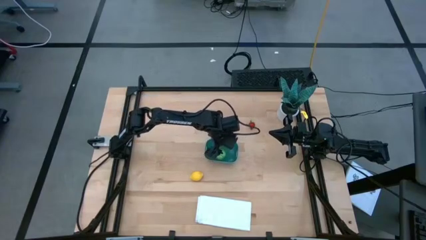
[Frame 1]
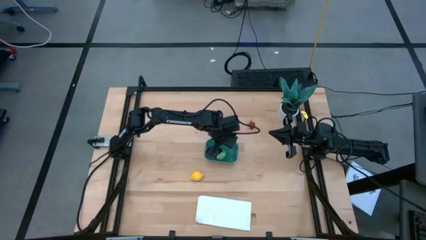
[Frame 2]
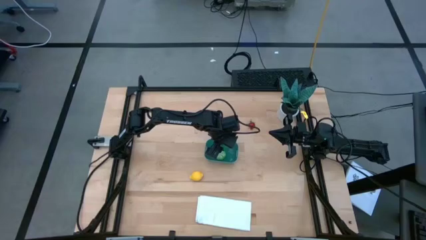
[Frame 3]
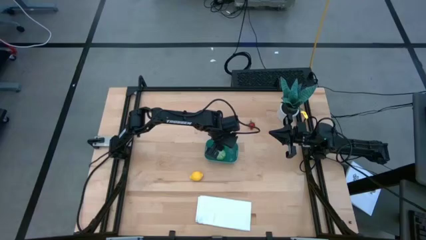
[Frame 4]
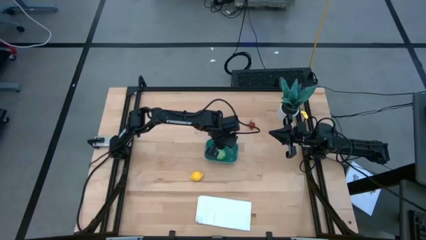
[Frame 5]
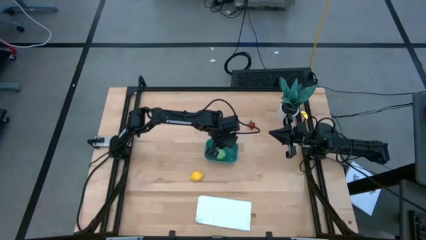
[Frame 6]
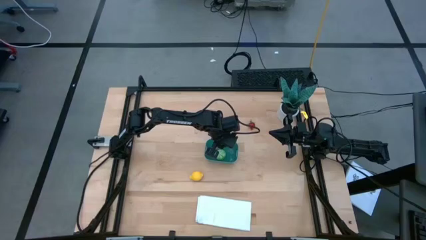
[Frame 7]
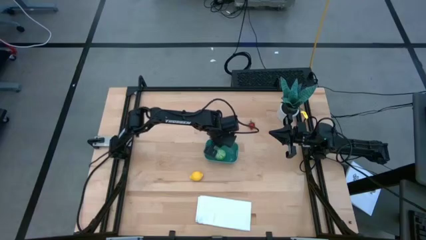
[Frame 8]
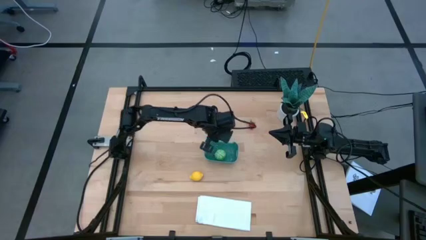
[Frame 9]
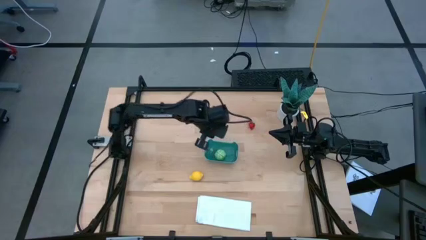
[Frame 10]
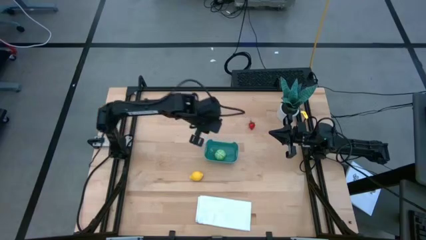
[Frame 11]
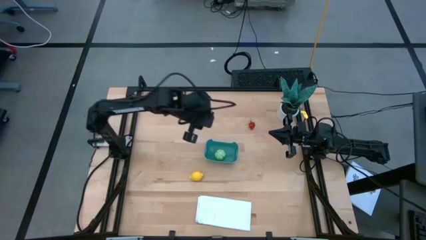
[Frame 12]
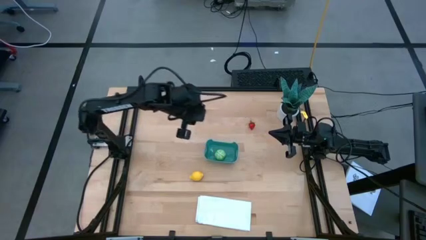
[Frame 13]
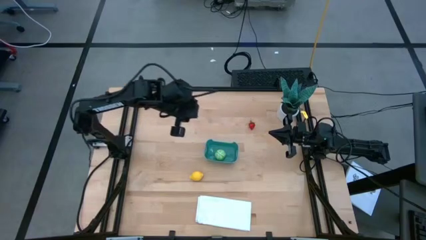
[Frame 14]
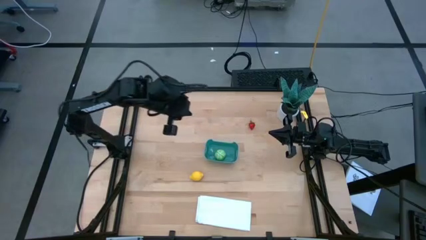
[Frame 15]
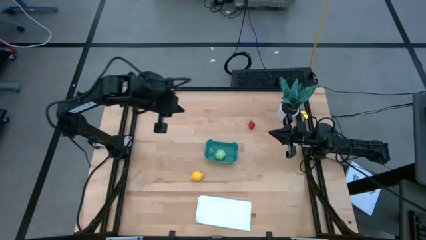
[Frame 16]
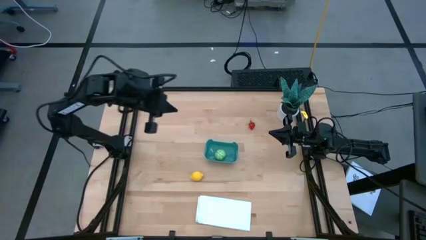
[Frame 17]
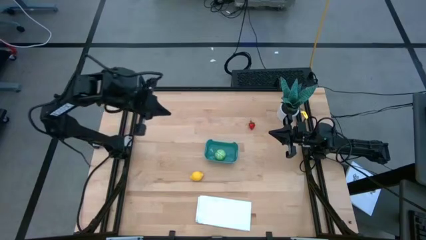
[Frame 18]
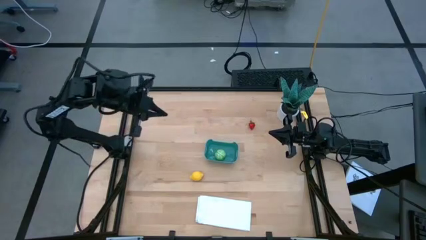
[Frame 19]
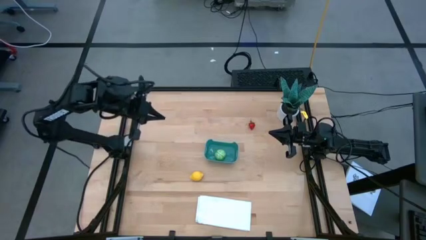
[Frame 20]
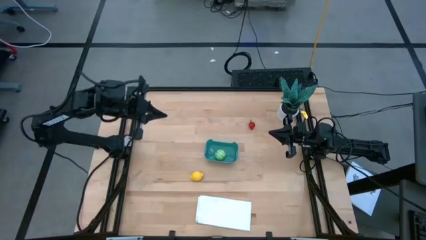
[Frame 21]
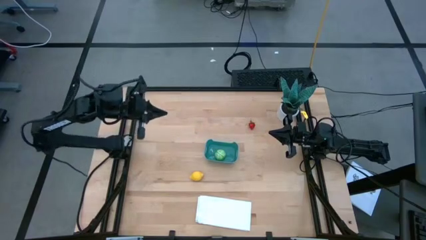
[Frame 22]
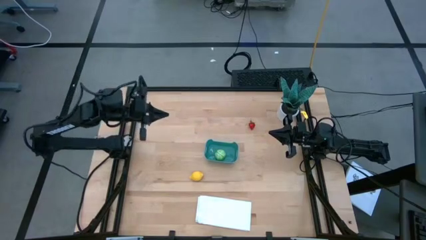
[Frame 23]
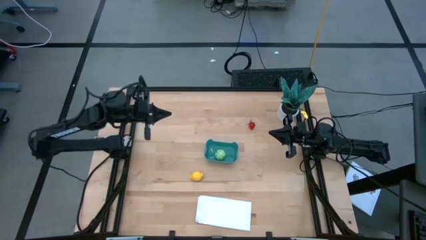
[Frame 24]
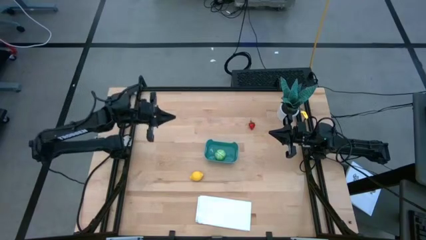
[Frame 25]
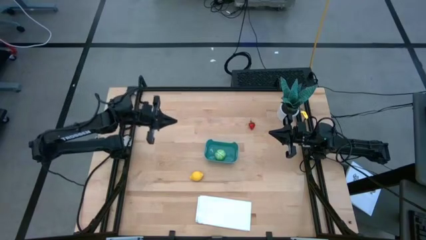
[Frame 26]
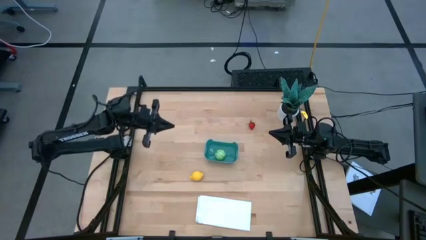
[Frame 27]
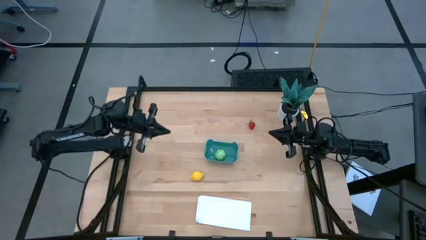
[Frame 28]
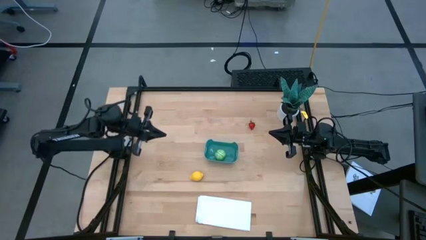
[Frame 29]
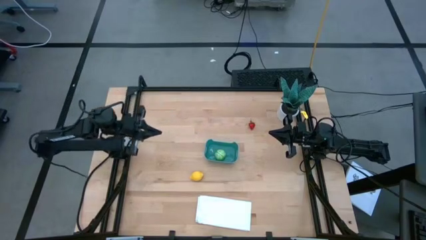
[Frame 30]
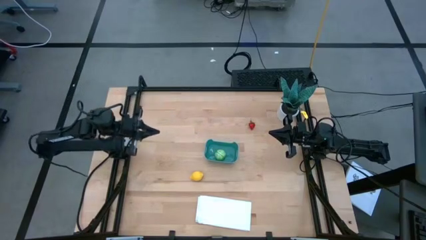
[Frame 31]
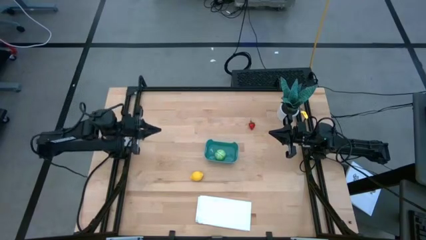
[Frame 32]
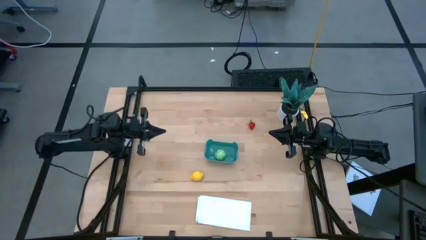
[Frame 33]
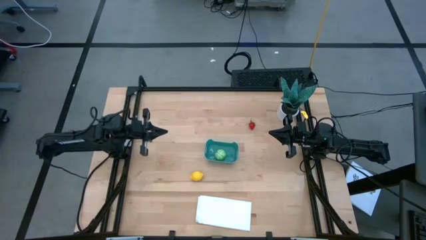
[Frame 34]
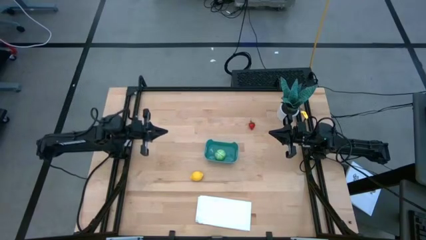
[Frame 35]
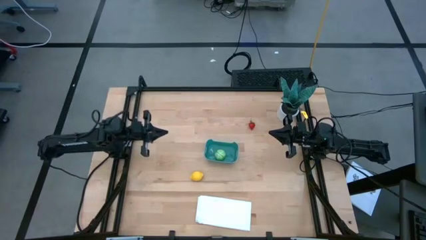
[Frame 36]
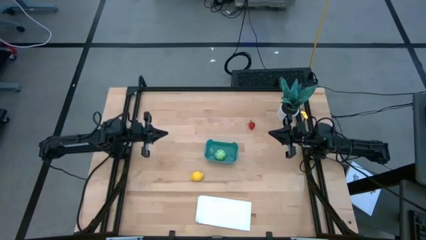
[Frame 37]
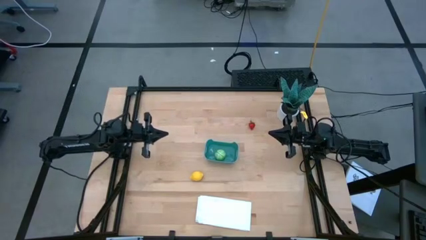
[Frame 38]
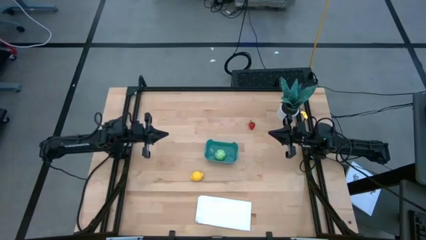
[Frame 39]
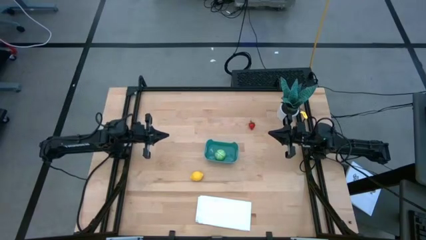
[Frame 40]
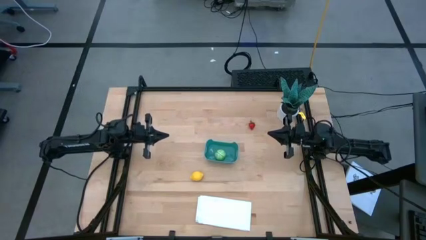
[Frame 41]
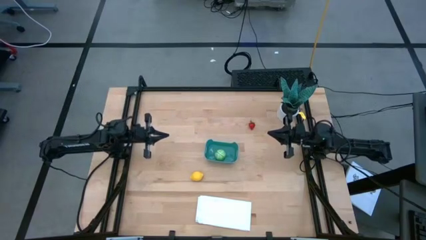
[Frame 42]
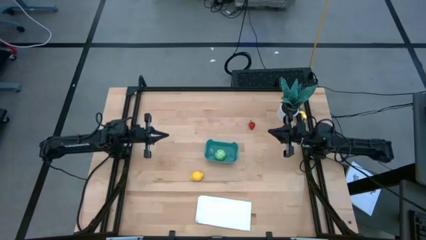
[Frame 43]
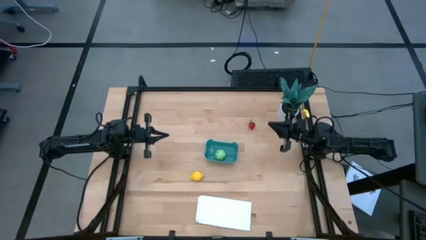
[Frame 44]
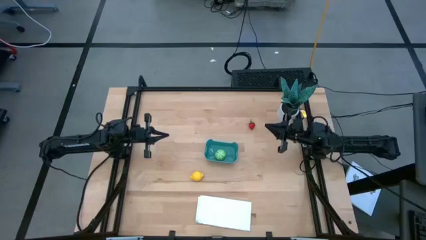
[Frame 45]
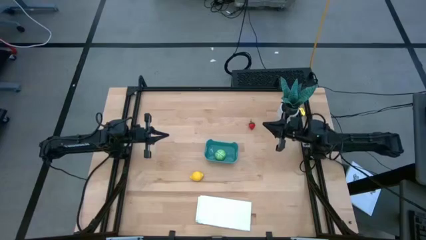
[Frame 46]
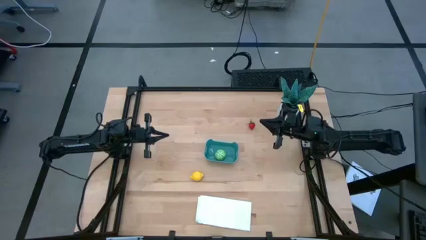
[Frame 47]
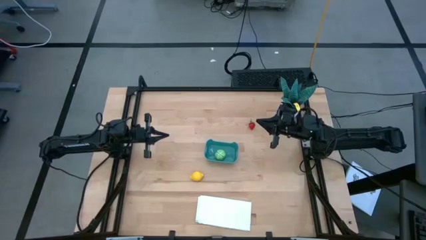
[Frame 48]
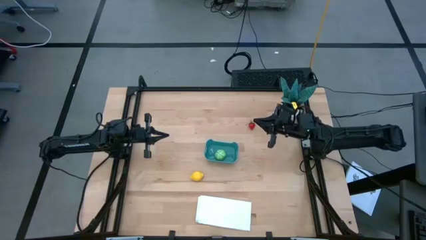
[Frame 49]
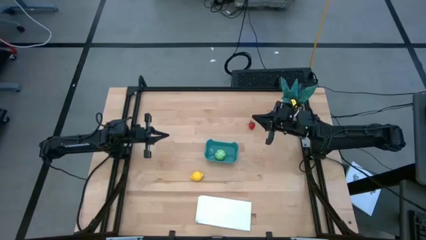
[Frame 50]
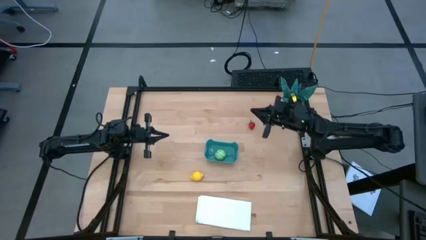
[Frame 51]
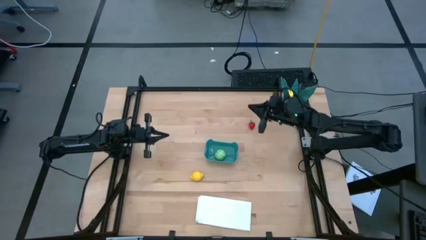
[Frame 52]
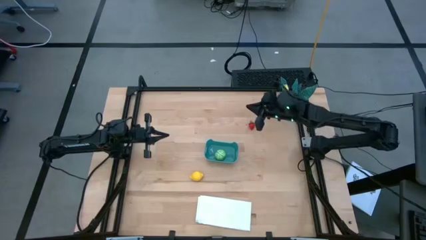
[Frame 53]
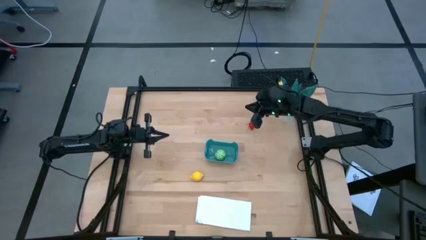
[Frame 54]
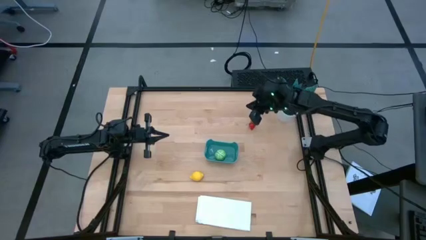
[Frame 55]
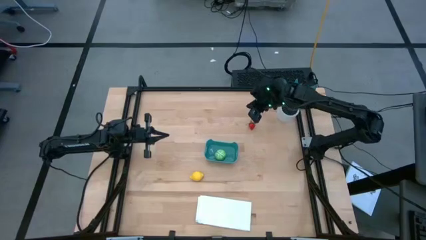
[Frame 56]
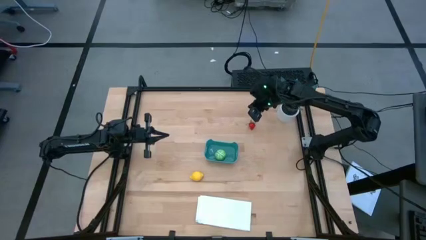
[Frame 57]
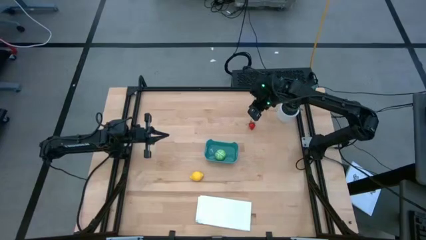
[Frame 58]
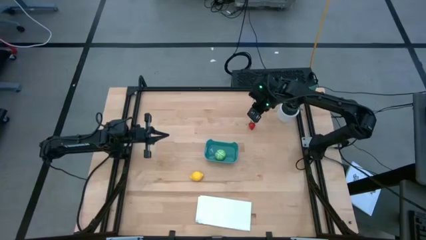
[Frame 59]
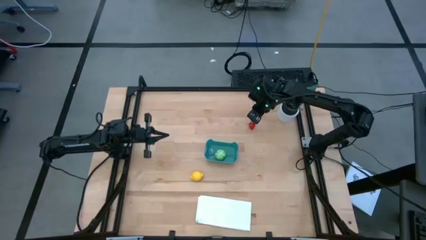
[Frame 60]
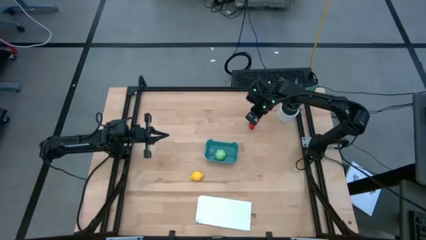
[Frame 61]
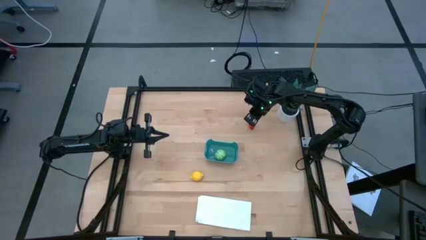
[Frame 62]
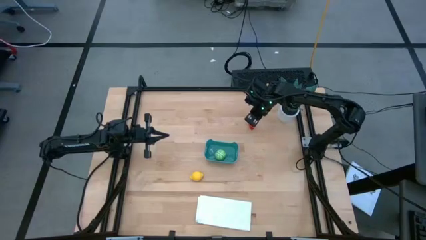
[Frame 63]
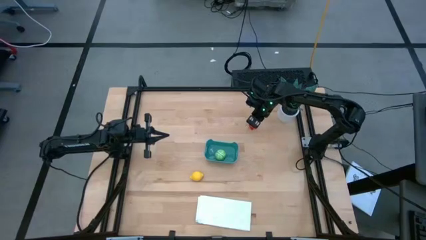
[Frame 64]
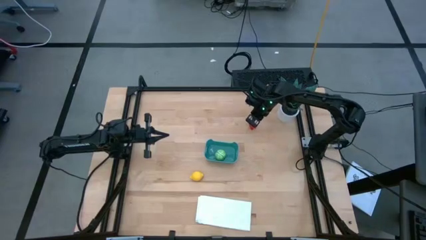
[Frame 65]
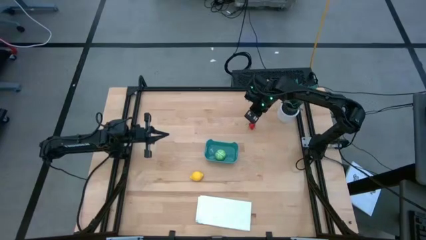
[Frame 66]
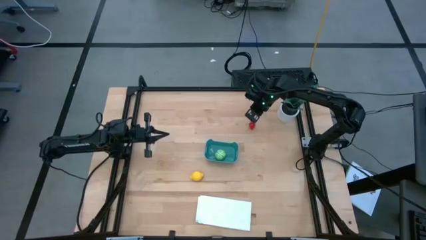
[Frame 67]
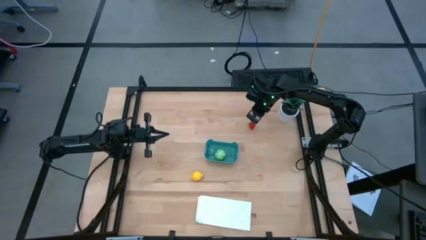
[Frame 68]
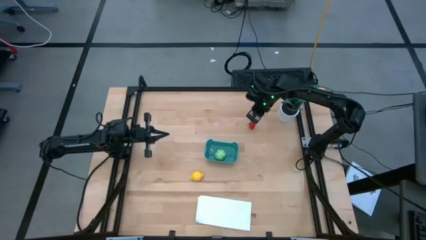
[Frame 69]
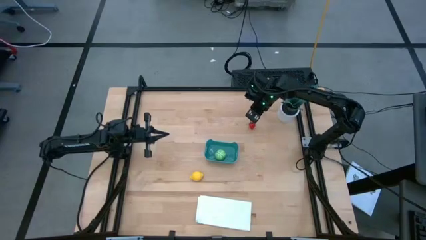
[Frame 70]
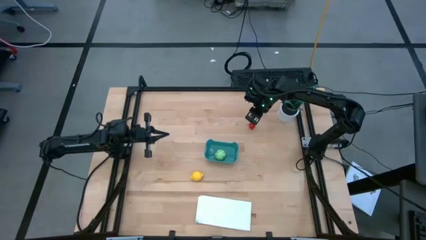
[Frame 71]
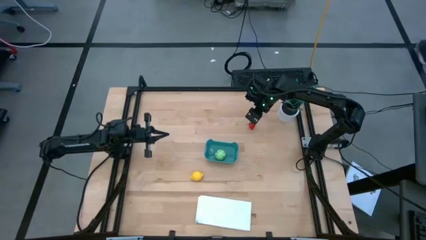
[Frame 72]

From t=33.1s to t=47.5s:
Task: Pick and placing Produce into tupperware
Put the red strawberry into the blue bin
